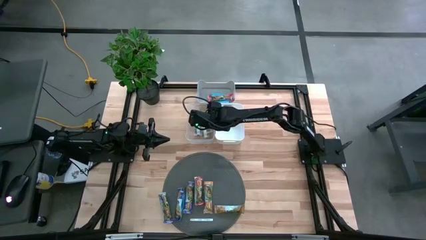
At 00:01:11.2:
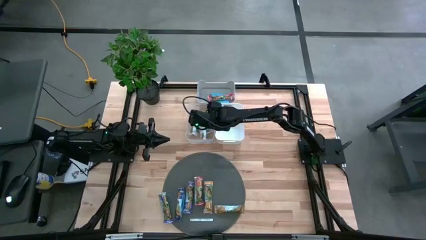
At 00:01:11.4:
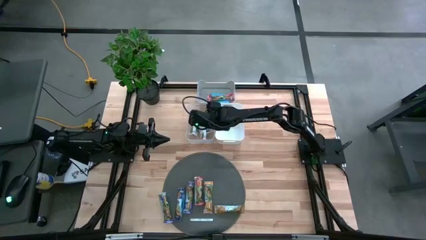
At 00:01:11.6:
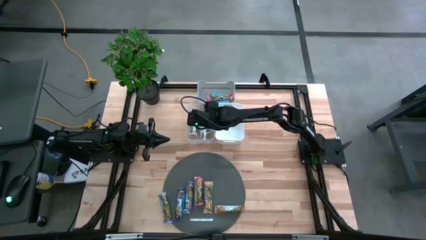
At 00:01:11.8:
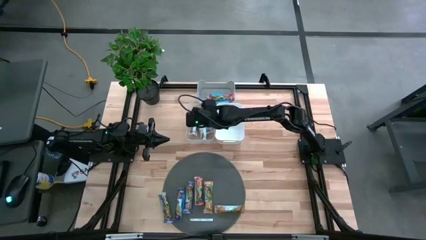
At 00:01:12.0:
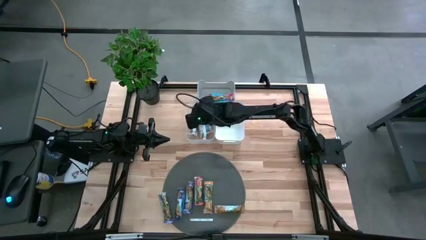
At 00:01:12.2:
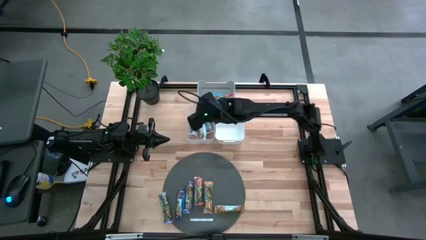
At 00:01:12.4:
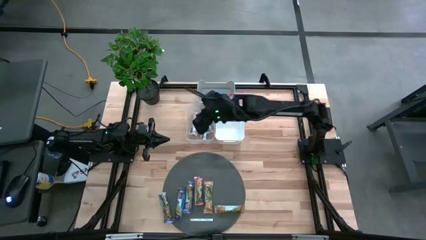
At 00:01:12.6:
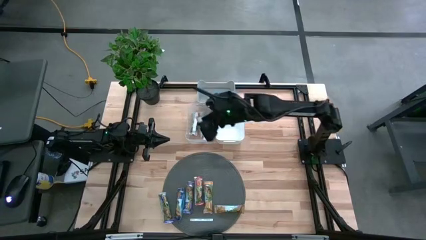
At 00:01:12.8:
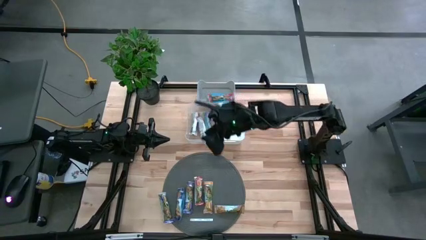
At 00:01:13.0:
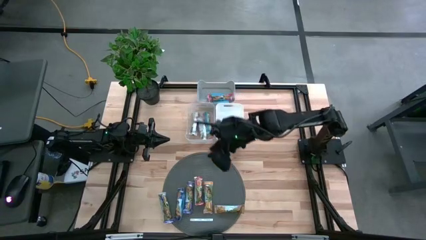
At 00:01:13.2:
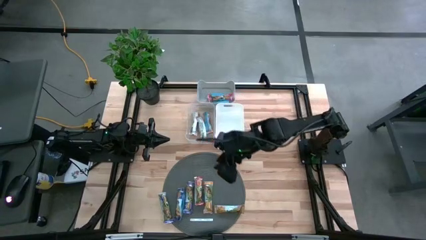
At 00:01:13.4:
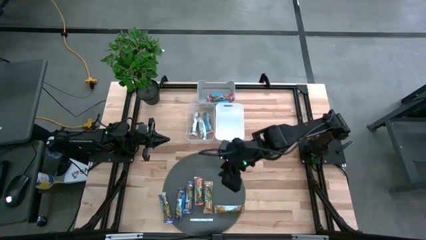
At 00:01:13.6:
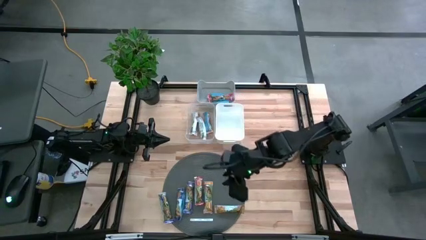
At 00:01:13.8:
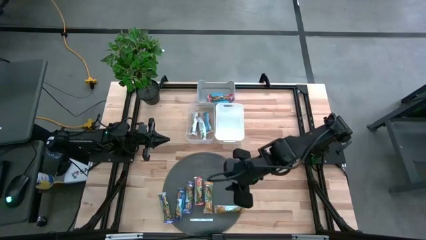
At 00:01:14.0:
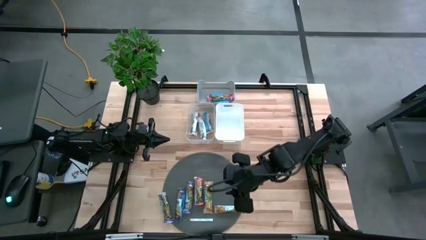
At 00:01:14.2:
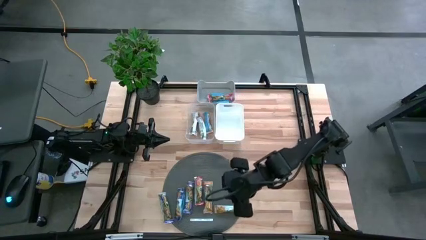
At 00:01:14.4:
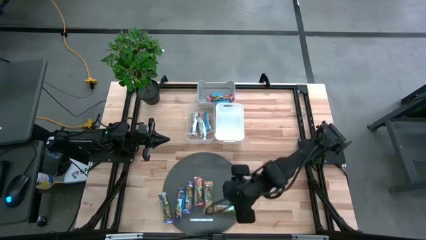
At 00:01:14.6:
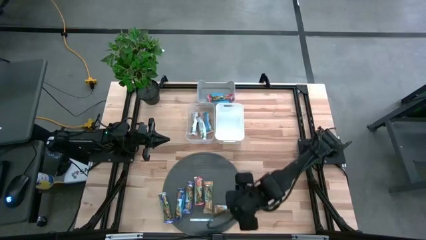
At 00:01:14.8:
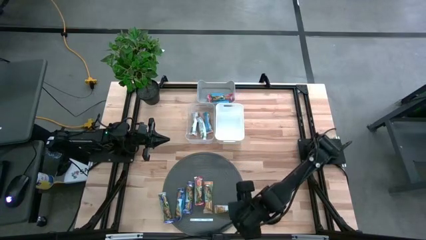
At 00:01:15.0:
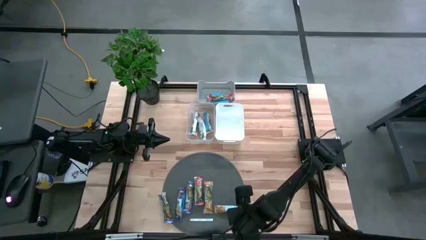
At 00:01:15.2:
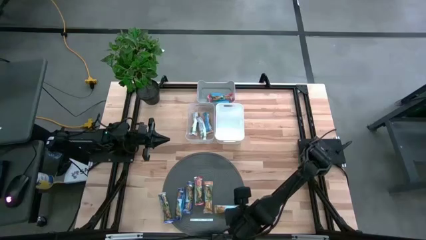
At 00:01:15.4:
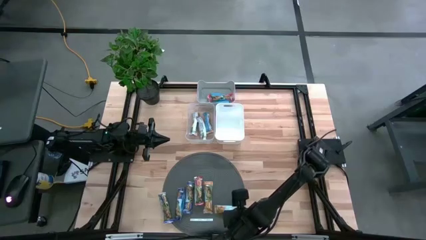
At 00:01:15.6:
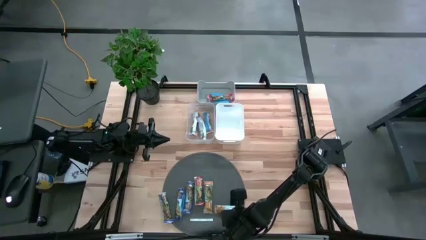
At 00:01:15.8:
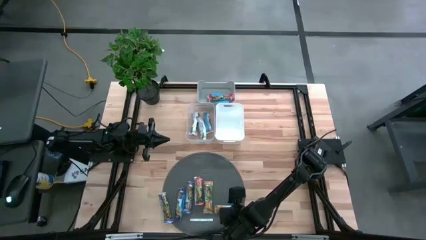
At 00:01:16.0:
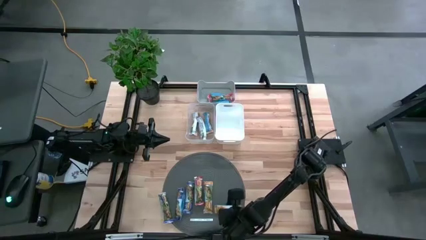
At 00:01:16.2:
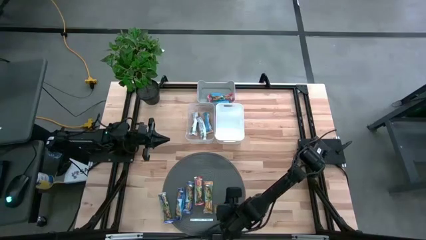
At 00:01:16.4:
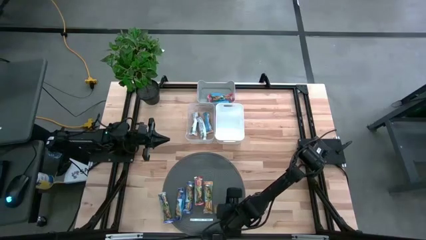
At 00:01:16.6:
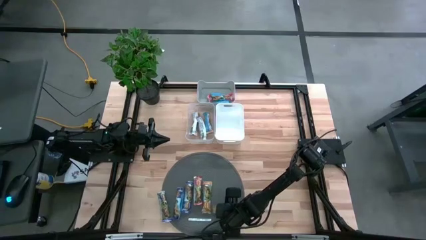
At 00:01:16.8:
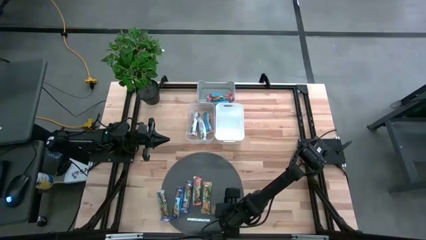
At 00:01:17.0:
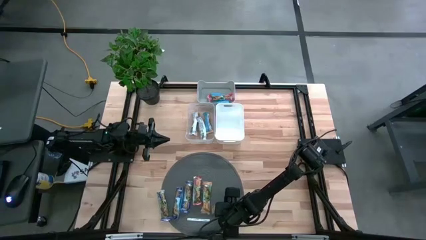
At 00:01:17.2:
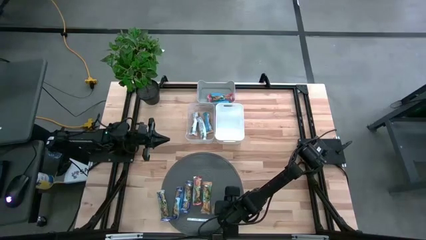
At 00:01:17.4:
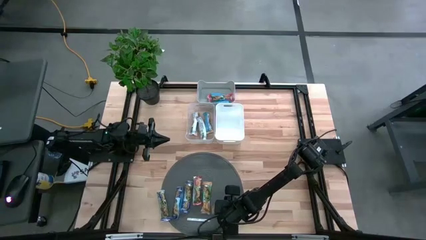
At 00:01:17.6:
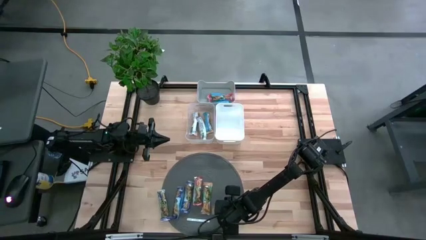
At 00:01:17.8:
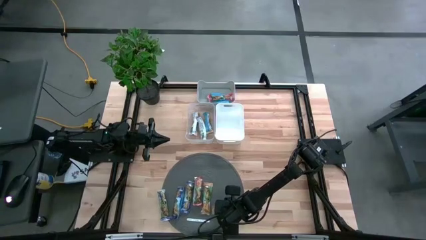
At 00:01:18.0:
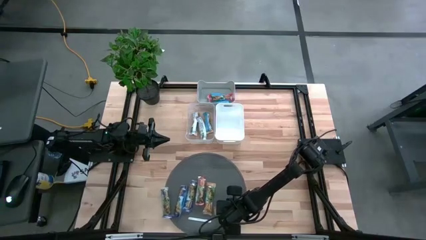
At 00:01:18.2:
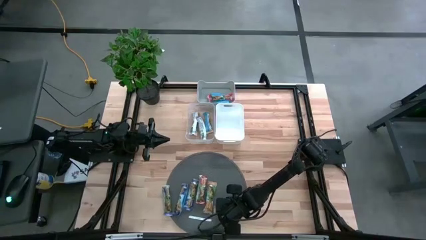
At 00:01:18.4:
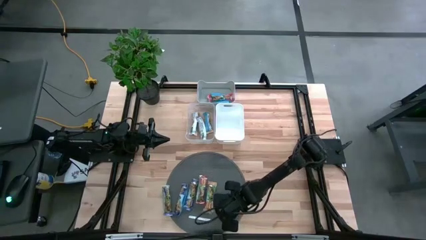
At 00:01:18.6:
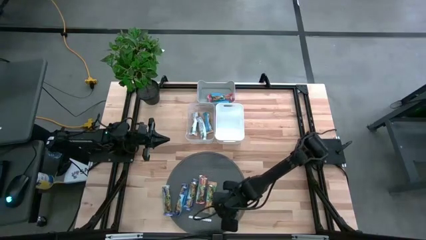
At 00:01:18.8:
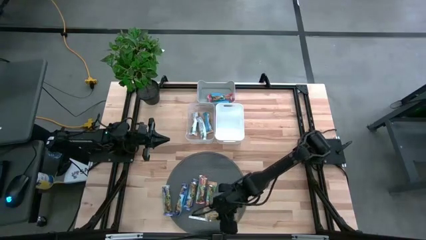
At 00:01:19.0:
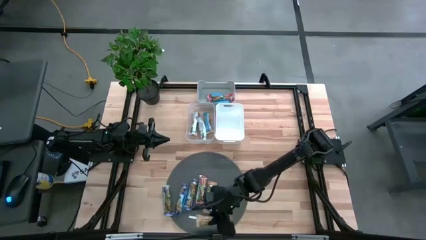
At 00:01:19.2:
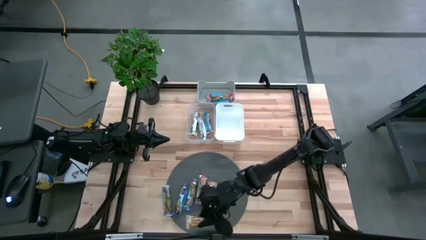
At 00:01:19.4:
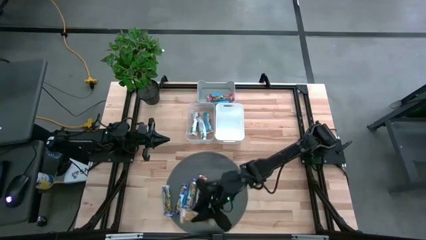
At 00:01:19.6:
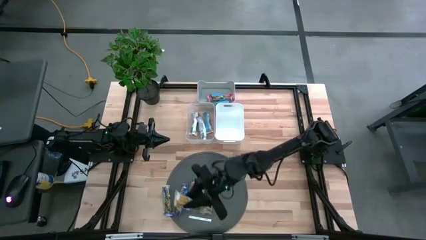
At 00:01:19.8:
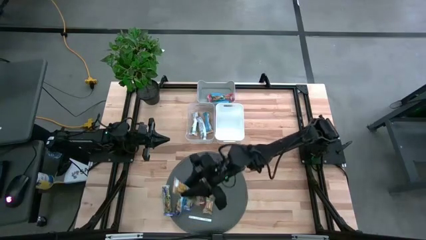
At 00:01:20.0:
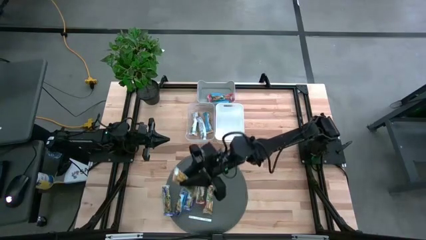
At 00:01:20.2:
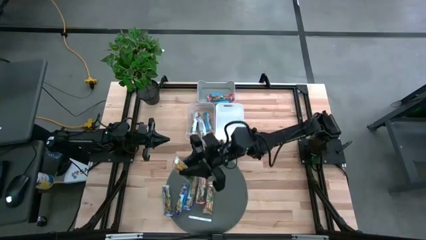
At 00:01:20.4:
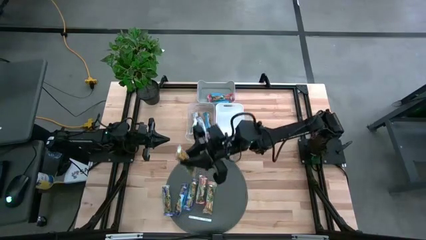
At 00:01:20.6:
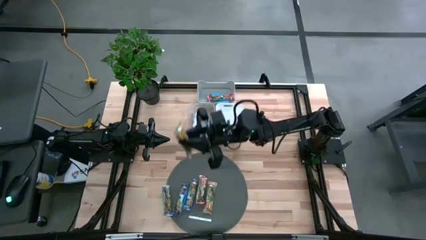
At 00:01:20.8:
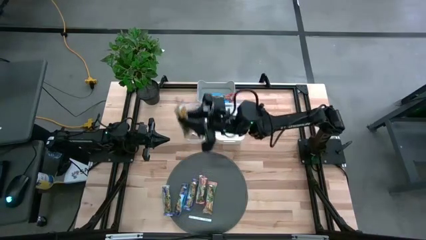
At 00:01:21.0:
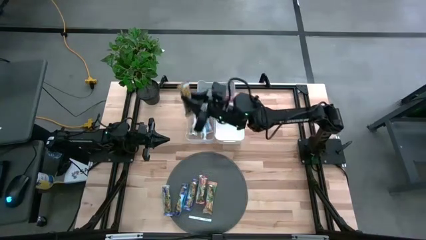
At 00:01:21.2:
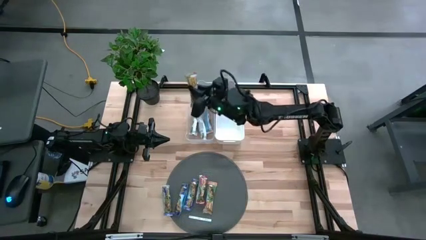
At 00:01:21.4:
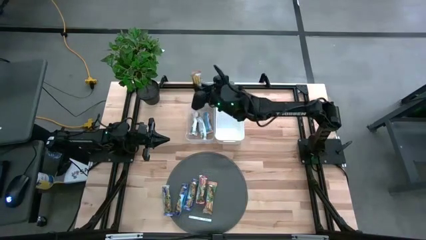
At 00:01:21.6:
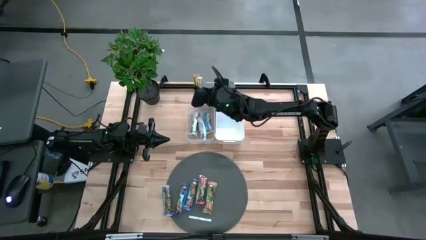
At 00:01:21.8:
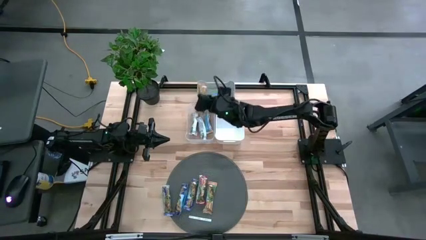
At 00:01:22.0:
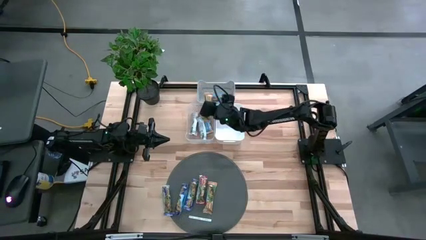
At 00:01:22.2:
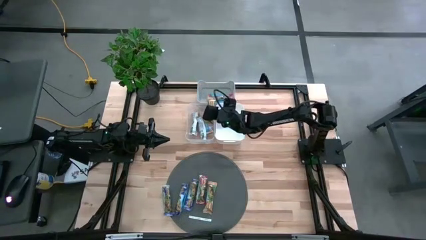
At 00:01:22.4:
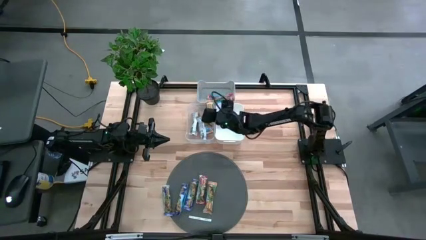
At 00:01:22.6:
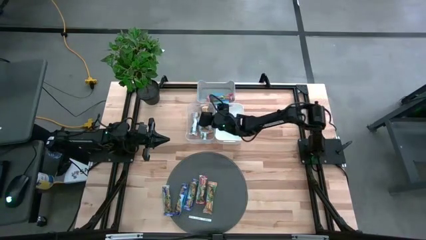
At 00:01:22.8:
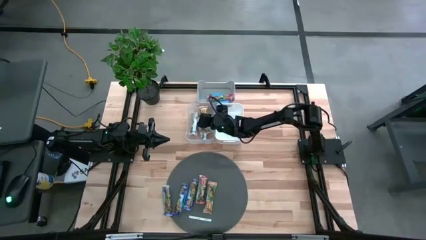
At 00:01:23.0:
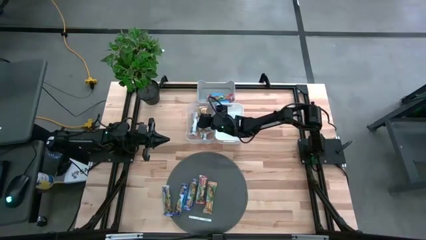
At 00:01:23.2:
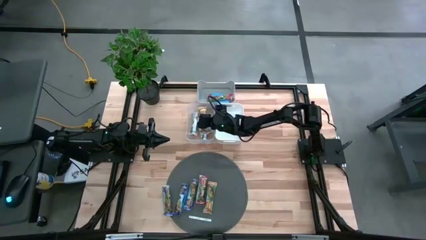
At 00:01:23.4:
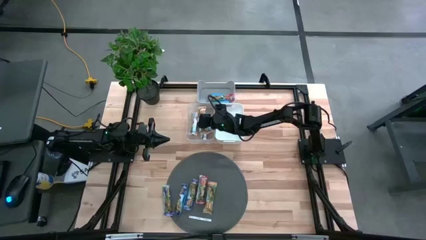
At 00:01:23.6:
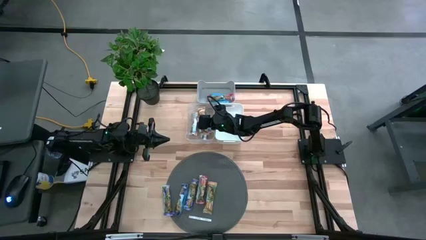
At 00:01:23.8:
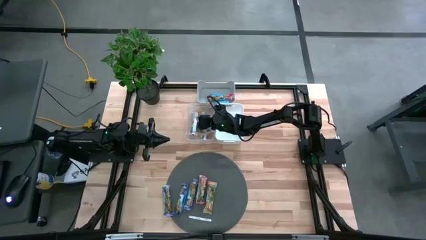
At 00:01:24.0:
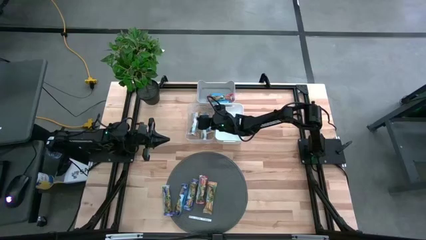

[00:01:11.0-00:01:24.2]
Task: Pick and place Granola Bars by type
Put the yellow granola bar into the transparent bin
